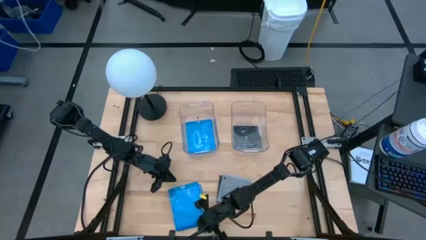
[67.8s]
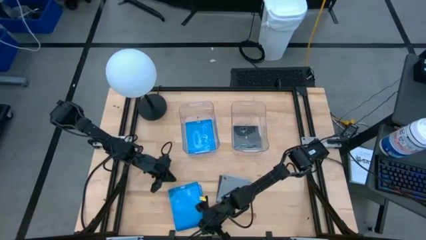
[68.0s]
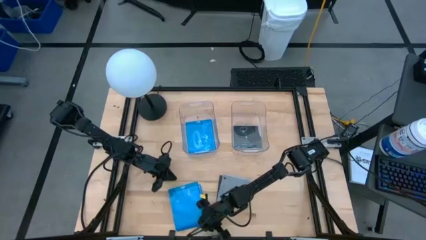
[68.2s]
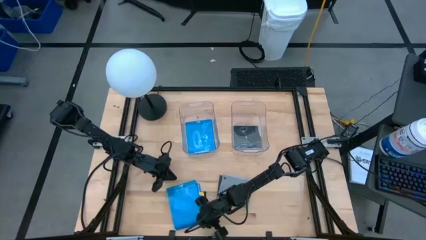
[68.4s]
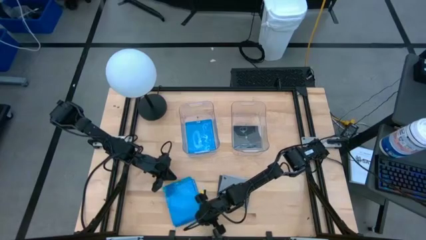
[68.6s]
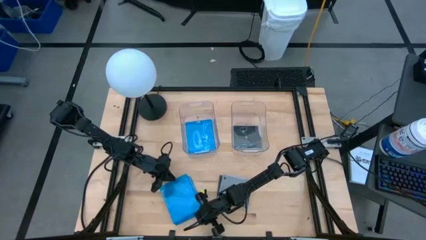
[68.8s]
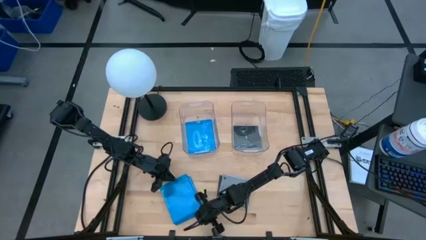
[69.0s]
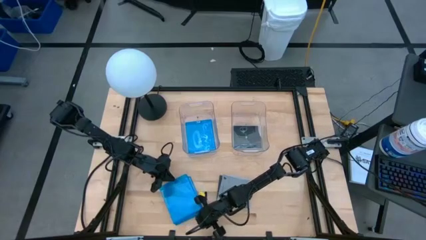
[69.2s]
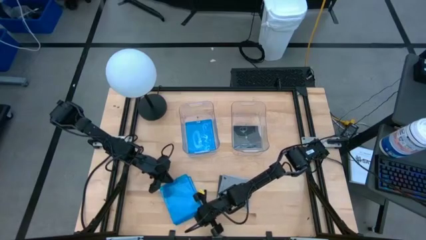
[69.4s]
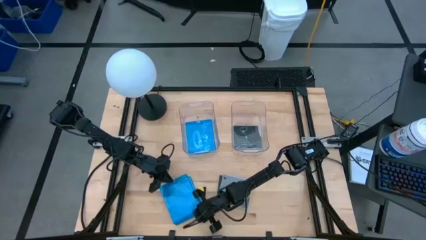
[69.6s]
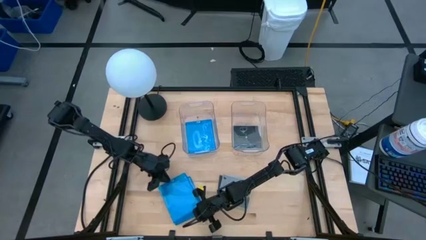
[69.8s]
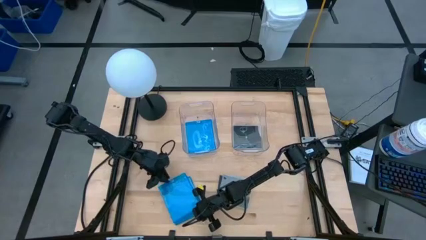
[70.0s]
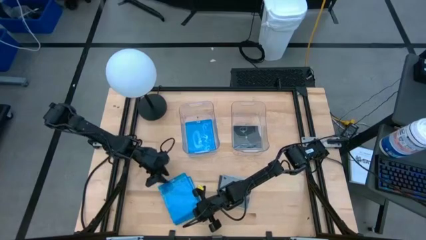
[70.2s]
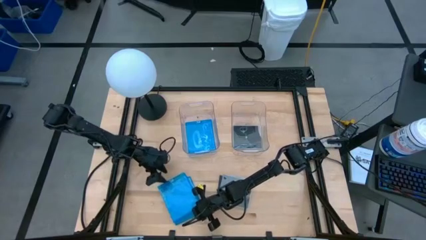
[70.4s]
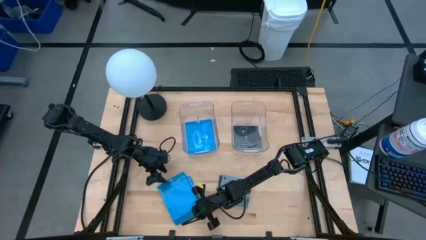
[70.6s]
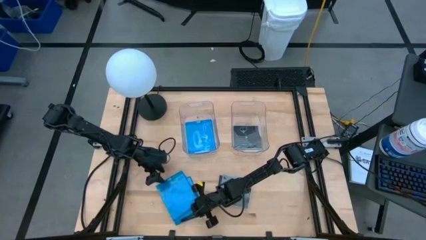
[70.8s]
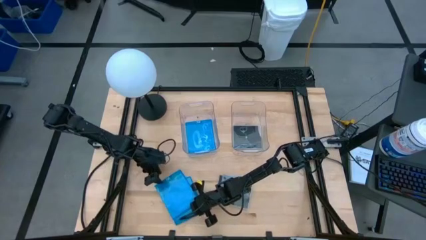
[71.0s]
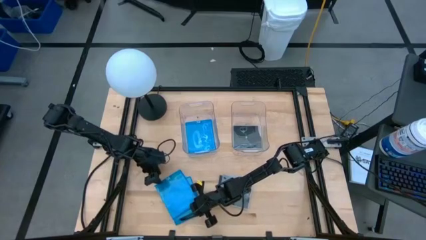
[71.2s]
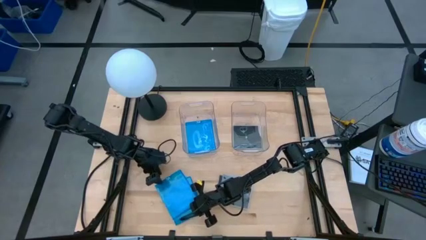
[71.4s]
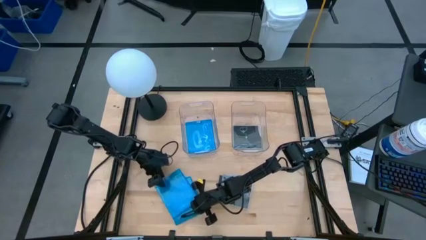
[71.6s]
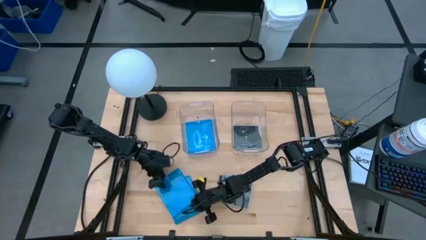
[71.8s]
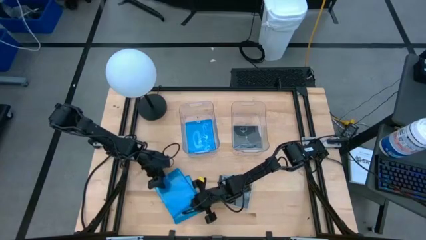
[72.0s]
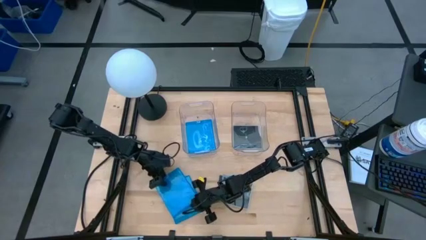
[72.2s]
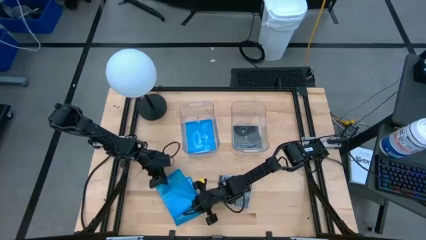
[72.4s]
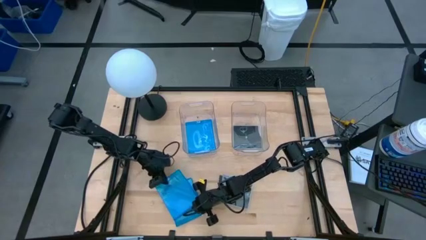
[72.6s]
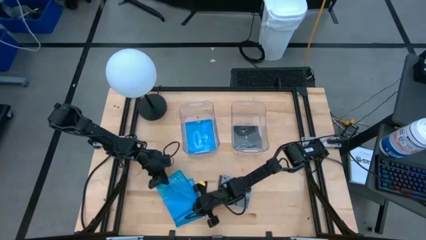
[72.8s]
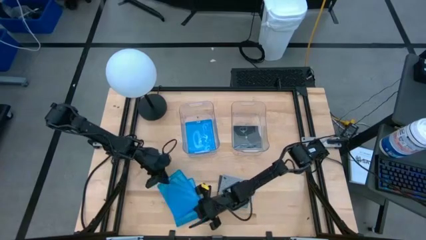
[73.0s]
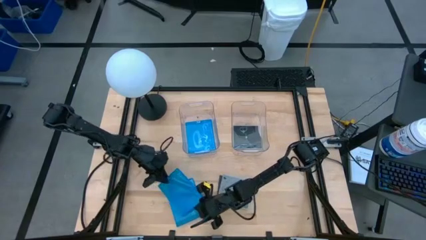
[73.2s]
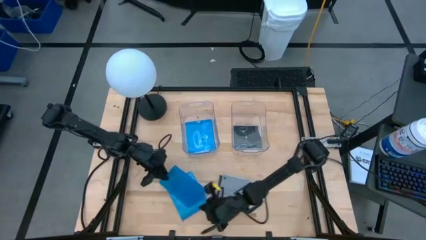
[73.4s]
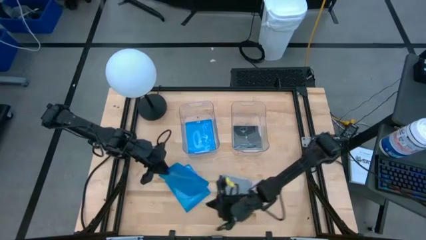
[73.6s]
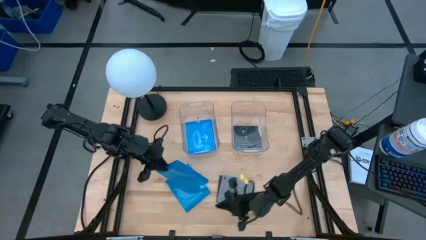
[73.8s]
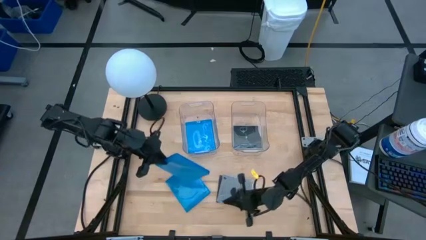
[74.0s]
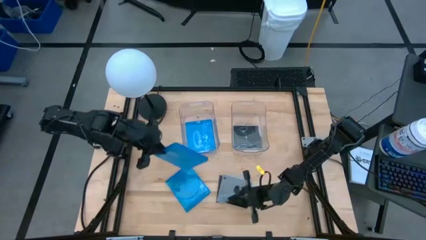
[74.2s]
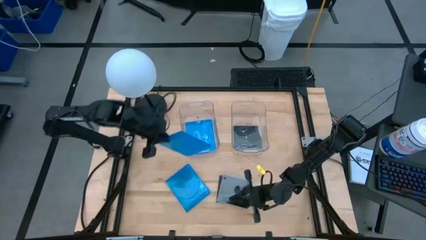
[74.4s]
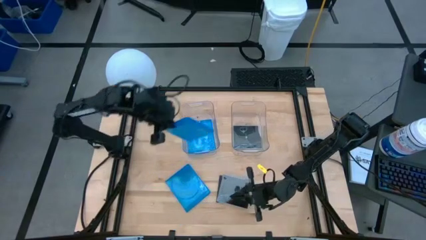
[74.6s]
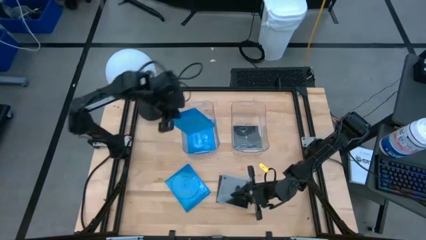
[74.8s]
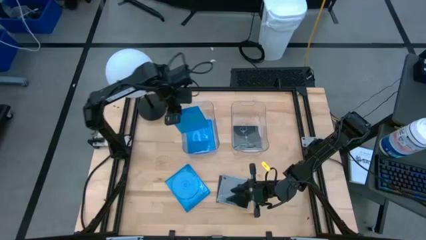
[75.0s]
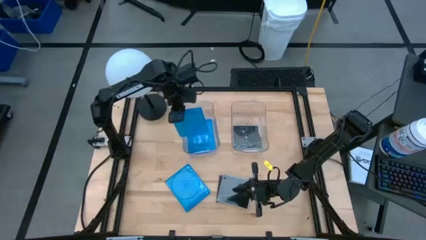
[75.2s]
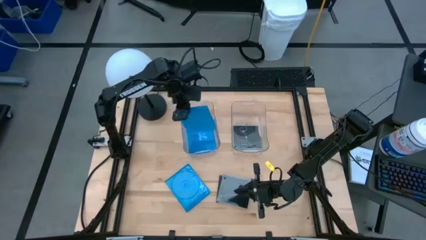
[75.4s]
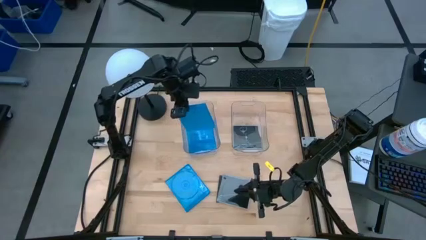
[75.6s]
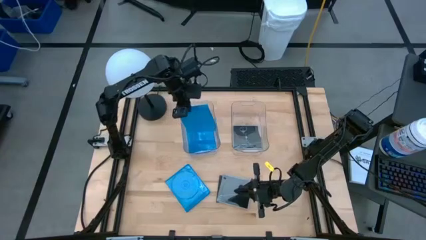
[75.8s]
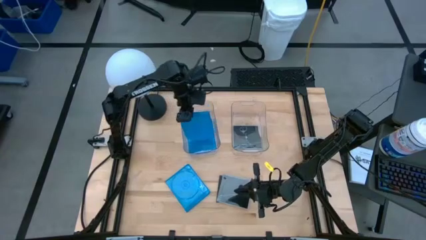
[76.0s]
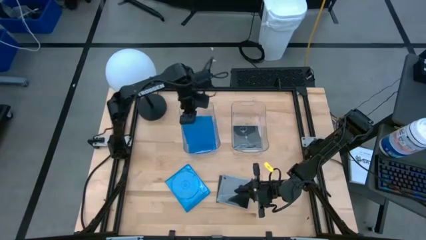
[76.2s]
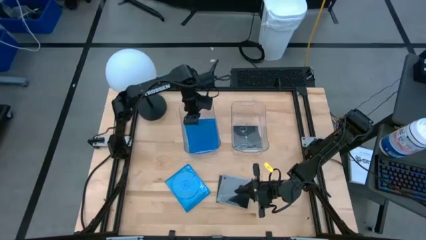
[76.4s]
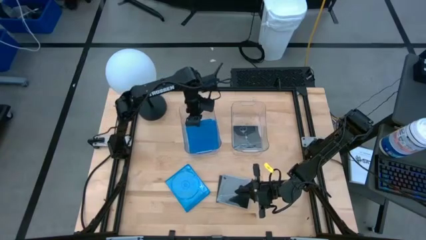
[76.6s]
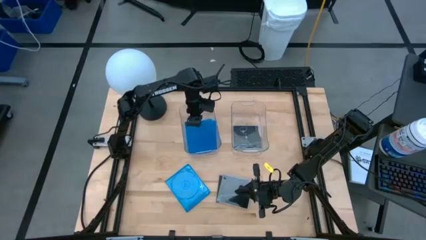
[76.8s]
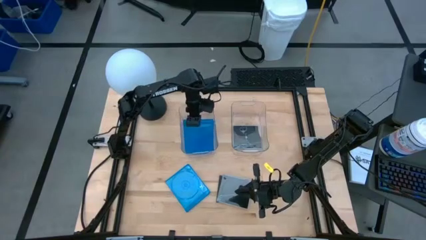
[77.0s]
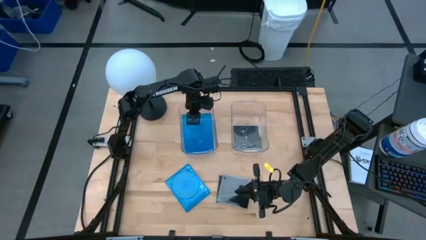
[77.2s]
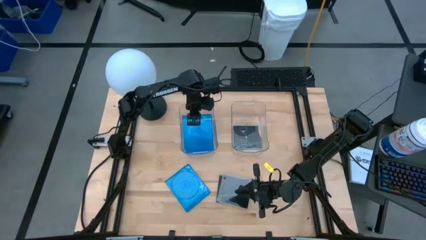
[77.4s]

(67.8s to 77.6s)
Task: Pick & place jewel cases by type
Put the blue cd case into the left transparent bin

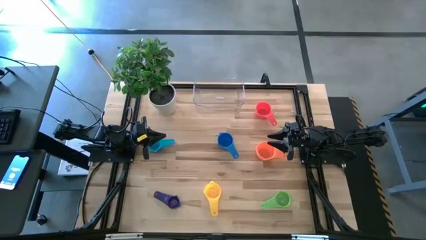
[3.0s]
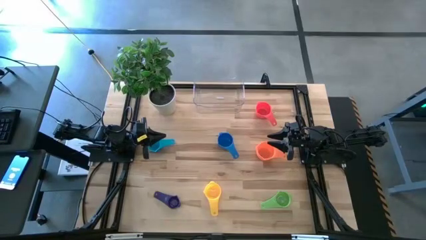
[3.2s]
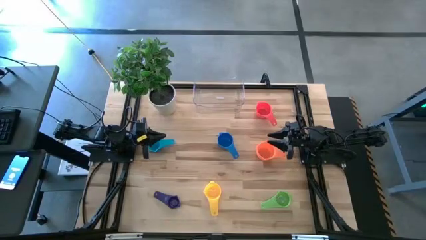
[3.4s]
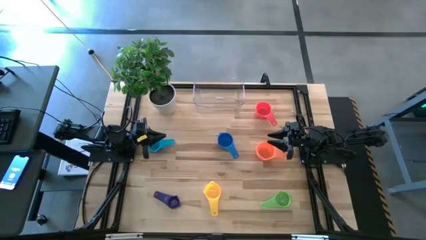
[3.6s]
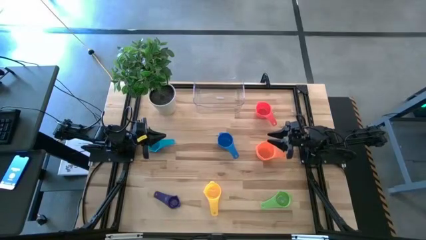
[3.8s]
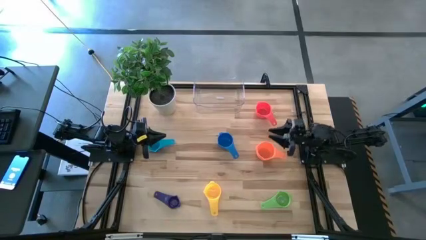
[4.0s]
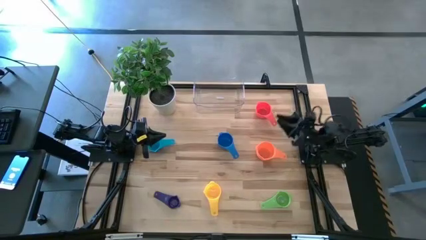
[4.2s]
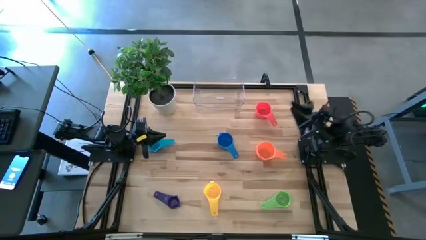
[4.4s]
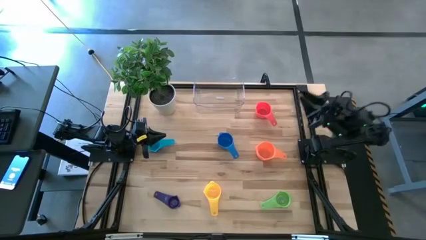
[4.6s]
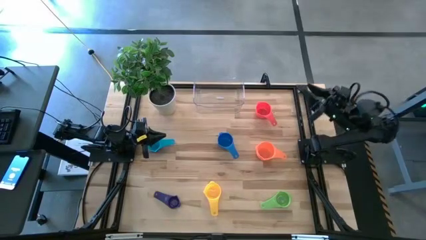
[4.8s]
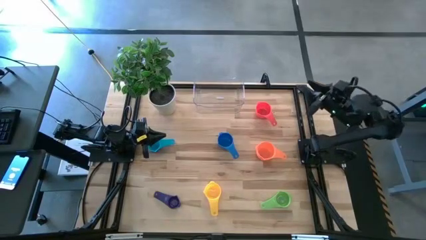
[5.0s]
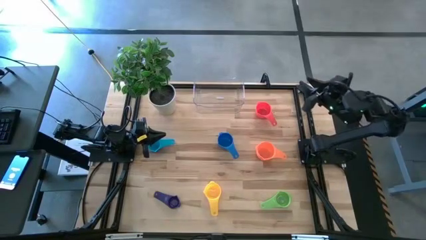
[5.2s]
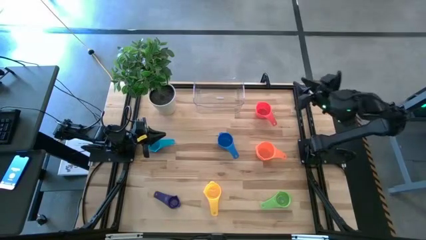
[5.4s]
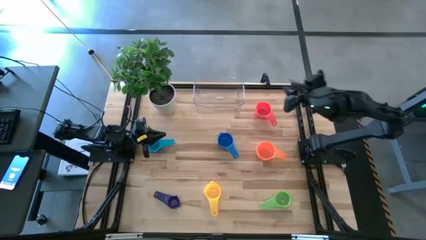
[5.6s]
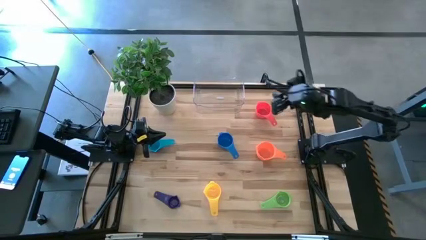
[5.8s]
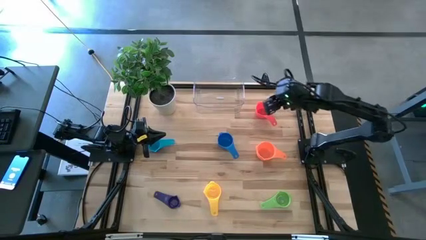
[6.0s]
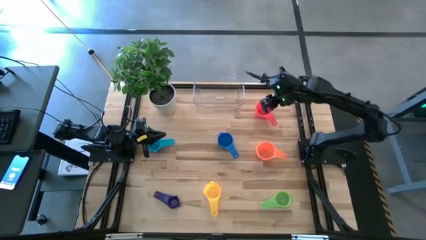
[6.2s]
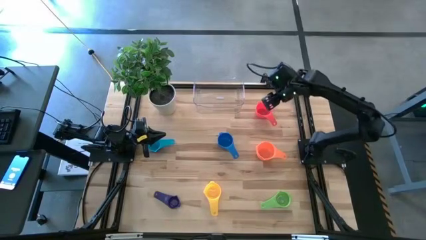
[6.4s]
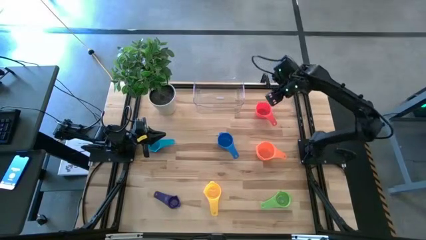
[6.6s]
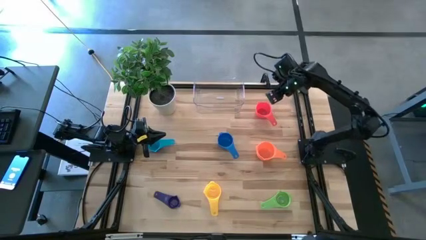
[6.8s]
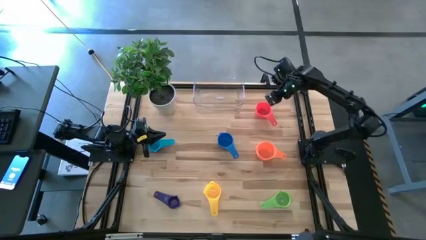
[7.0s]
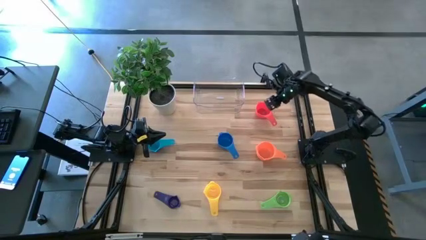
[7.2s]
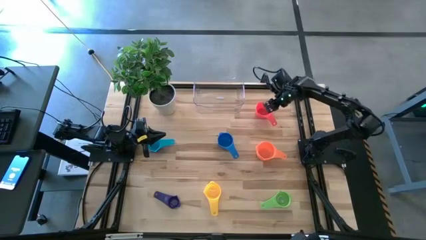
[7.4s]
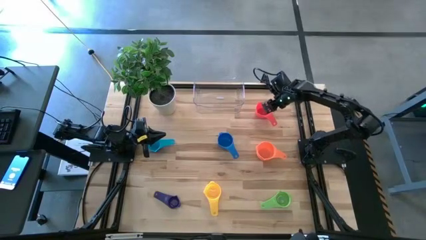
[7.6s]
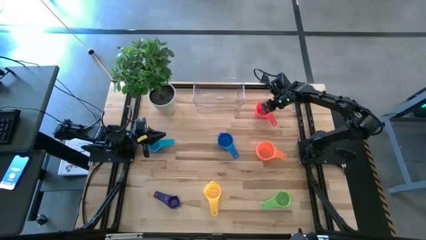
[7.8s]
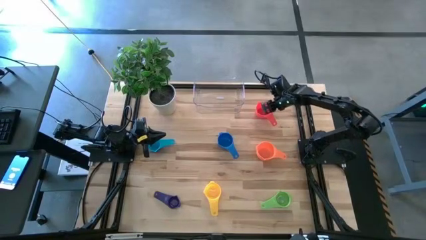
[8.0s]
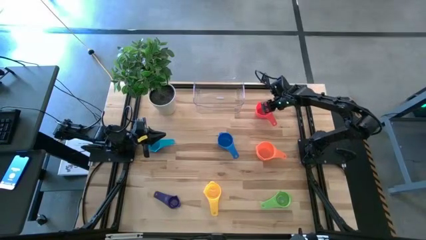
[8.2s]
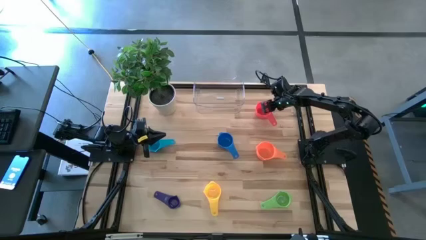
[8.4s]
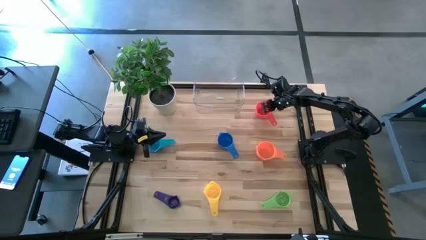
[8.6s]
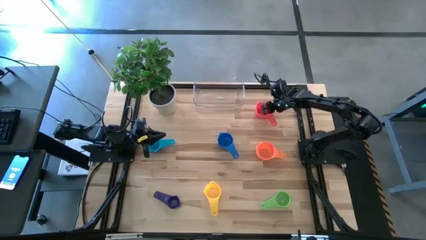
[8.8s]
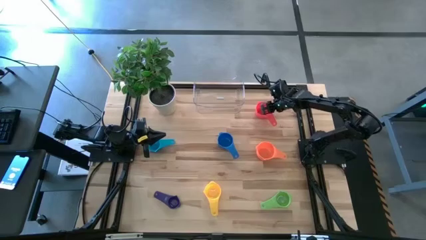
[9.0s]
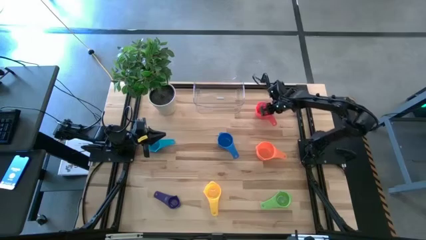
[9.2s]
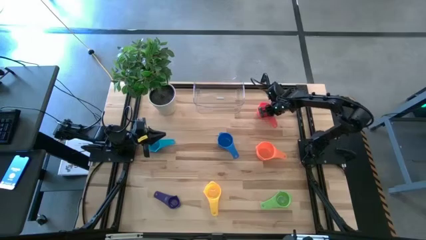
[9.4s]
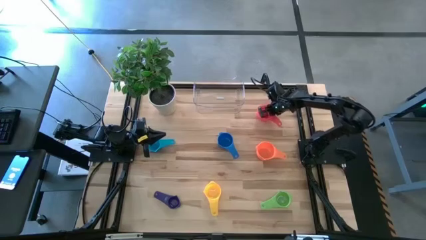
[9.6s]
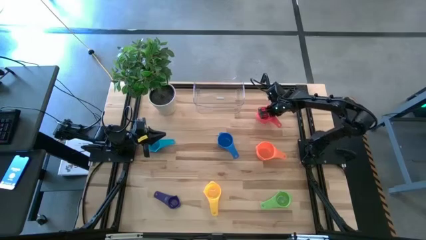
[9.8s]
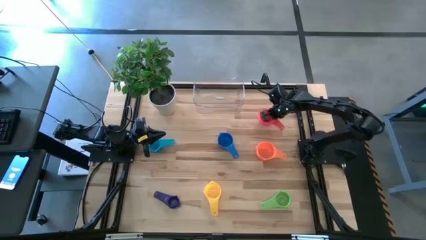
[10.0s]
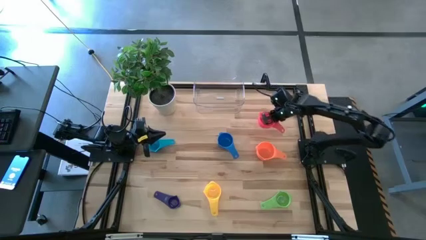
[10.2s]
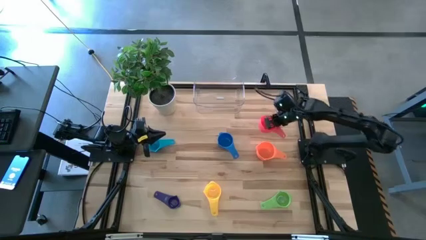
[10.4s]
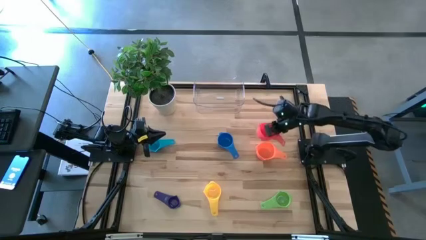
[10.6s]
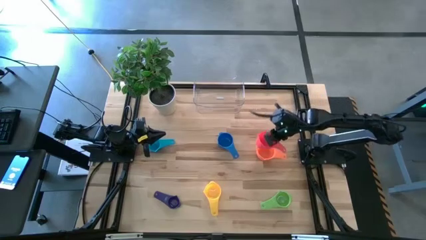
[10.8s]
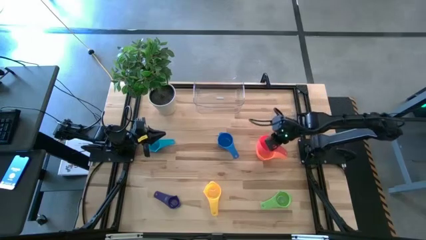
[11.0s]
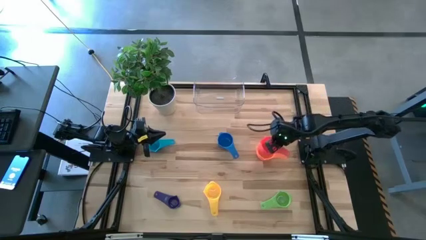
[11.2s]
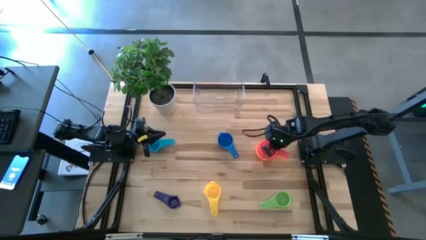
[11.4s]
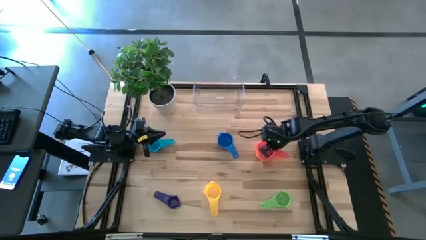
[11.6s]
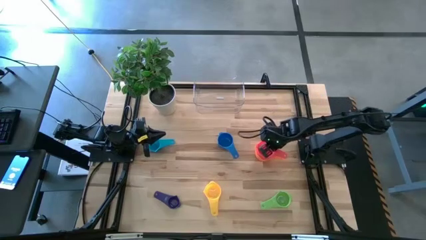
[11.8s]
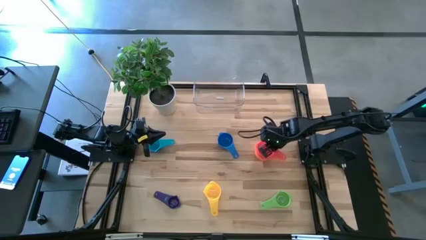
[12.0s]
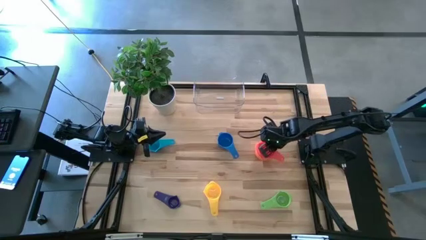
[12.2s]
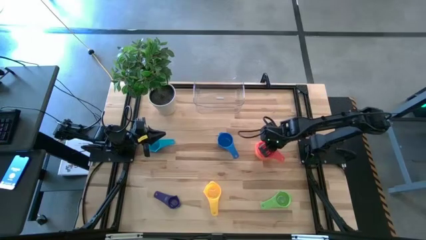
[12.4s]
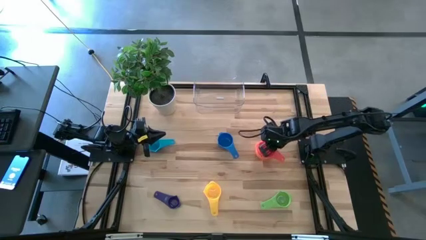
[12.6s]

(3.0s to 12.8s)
Task: Nest measuring cups in basket
Stack the red measuring cup on top of the orange measuring cup
